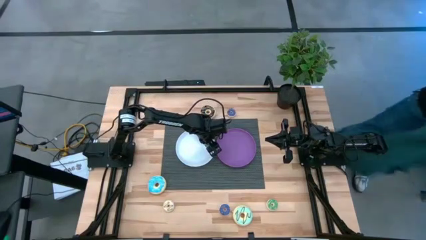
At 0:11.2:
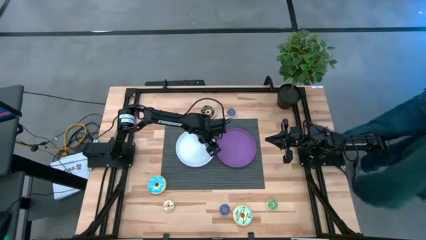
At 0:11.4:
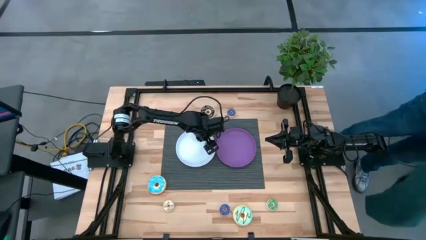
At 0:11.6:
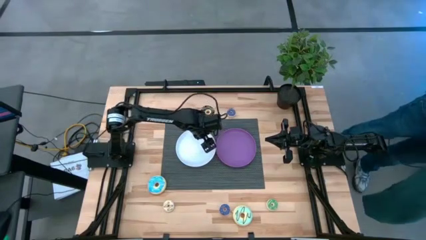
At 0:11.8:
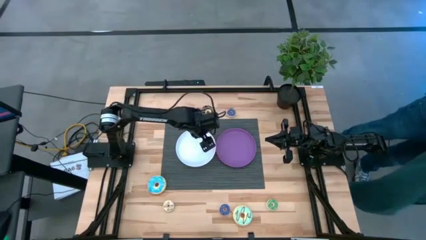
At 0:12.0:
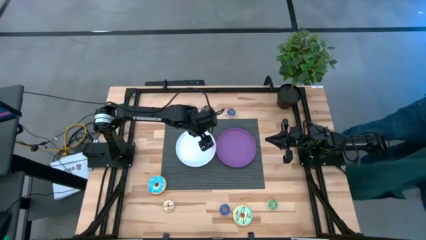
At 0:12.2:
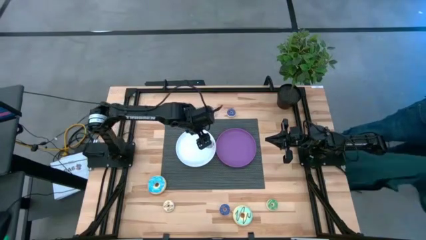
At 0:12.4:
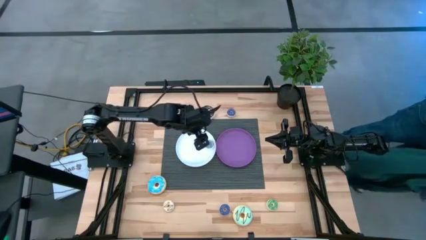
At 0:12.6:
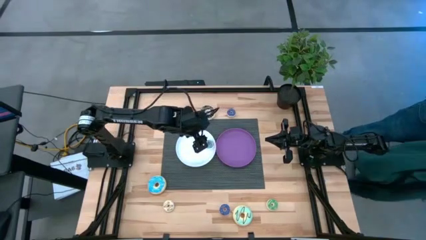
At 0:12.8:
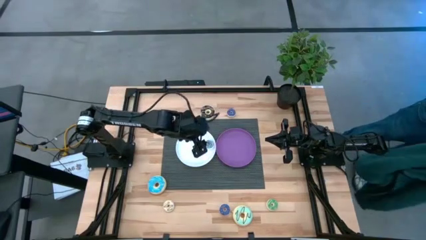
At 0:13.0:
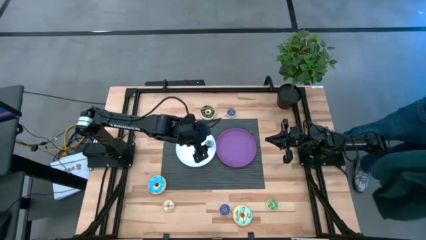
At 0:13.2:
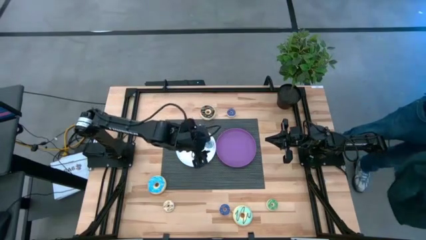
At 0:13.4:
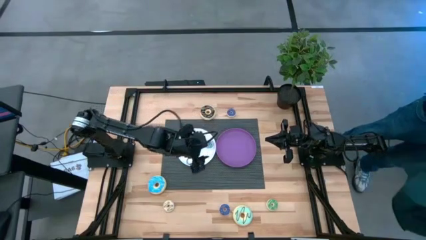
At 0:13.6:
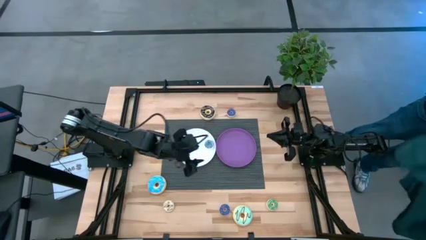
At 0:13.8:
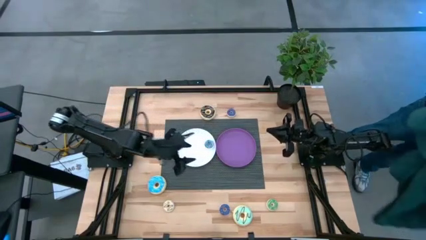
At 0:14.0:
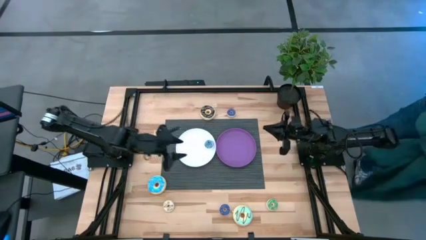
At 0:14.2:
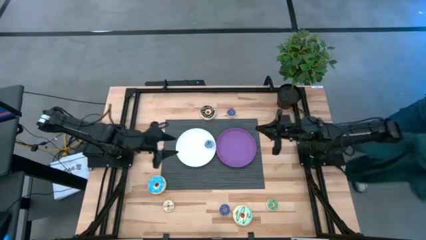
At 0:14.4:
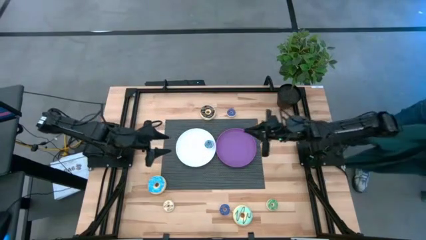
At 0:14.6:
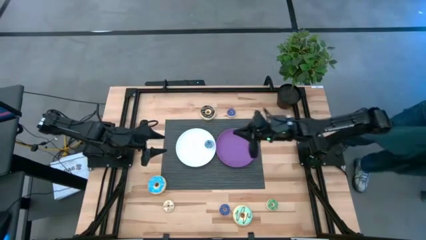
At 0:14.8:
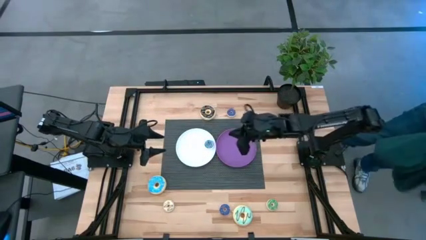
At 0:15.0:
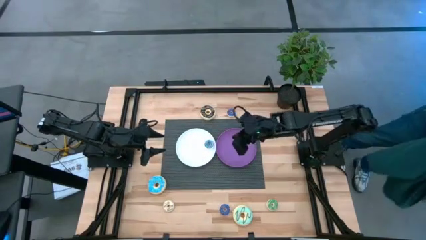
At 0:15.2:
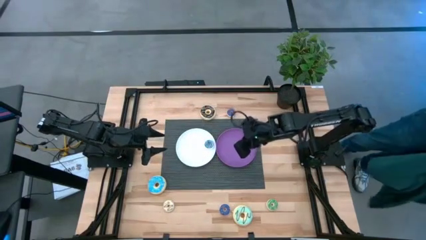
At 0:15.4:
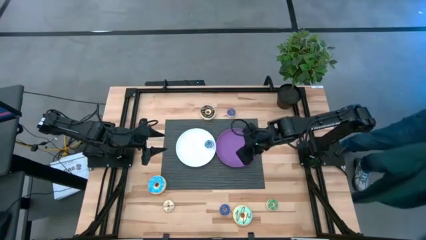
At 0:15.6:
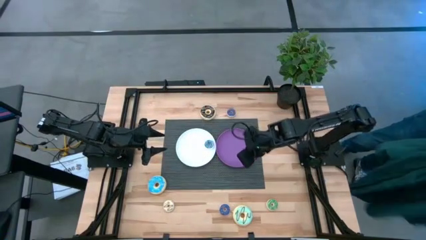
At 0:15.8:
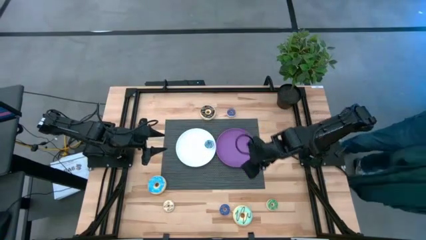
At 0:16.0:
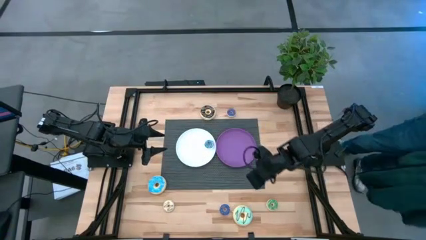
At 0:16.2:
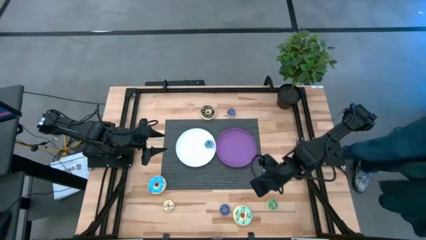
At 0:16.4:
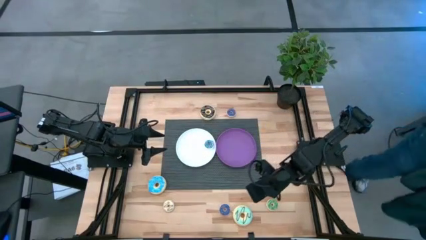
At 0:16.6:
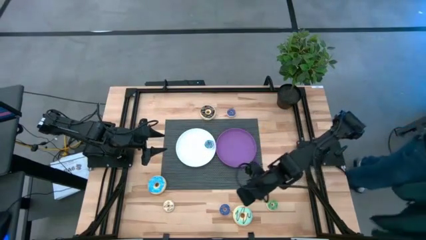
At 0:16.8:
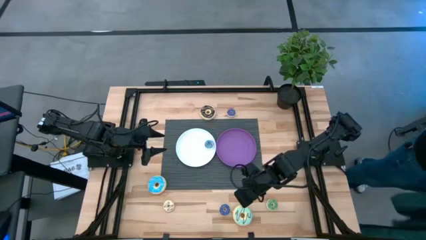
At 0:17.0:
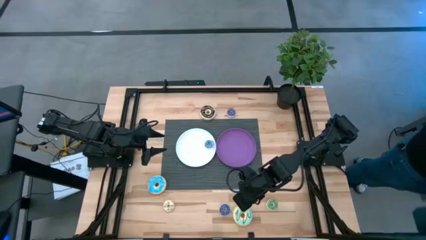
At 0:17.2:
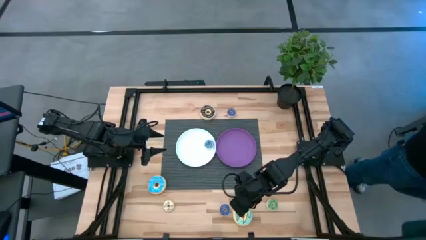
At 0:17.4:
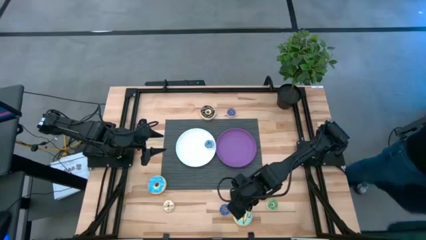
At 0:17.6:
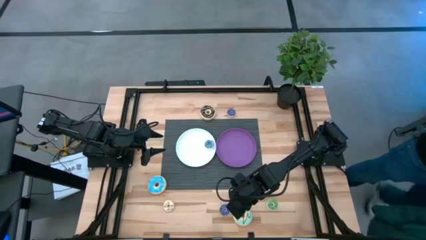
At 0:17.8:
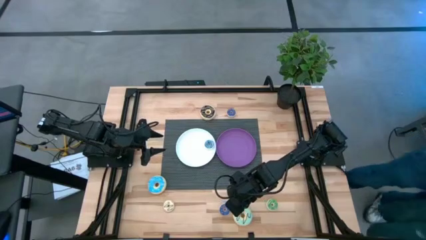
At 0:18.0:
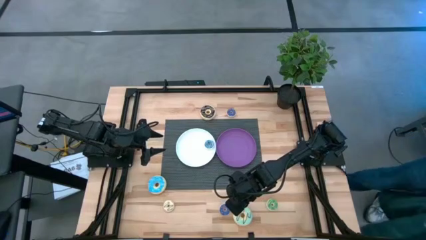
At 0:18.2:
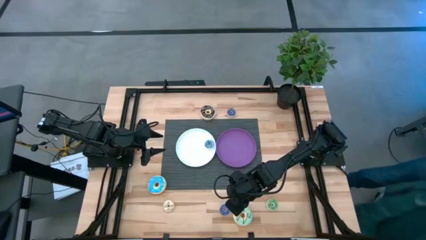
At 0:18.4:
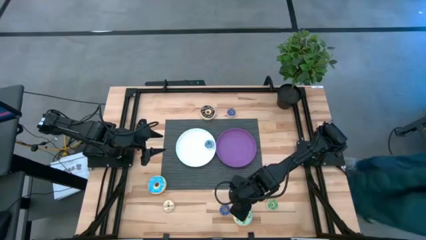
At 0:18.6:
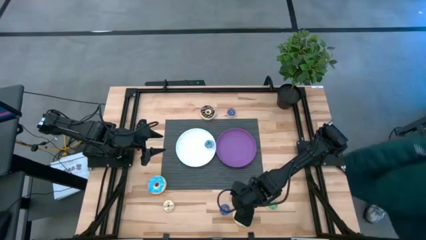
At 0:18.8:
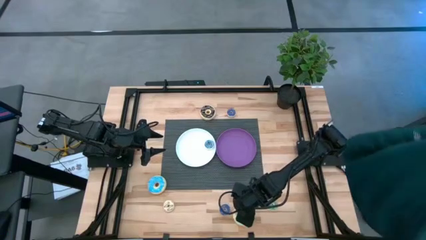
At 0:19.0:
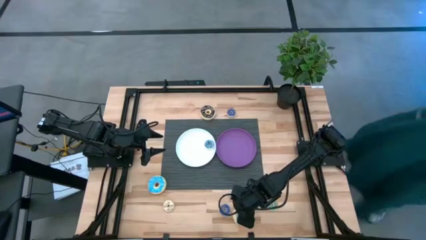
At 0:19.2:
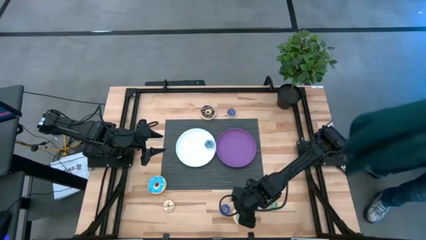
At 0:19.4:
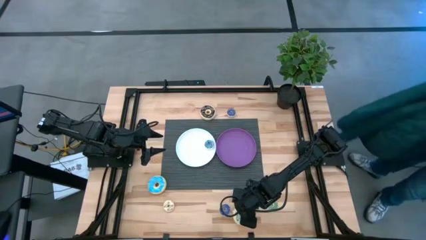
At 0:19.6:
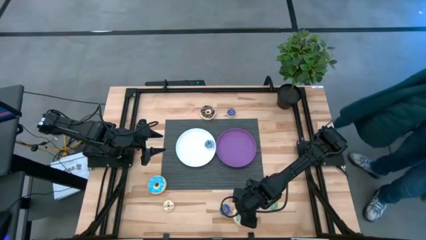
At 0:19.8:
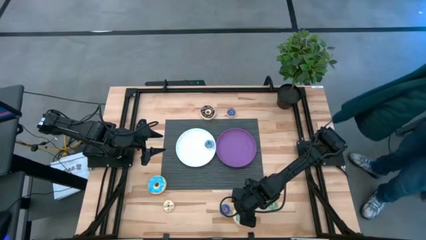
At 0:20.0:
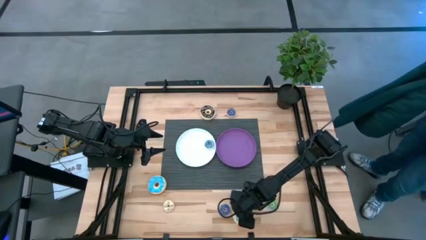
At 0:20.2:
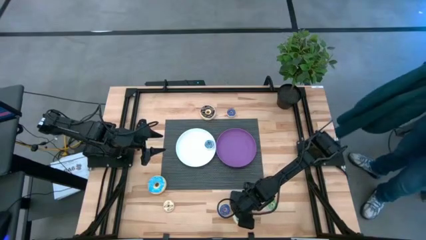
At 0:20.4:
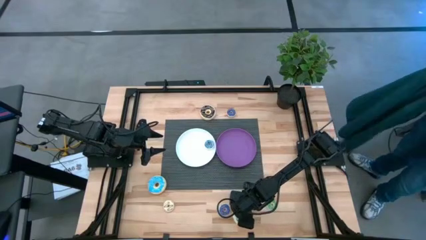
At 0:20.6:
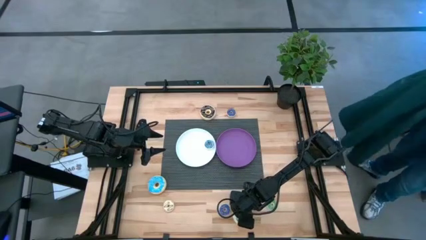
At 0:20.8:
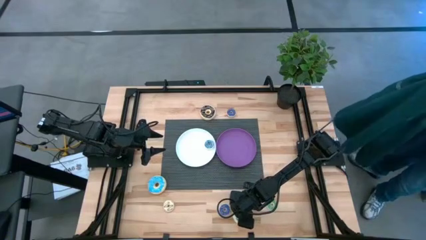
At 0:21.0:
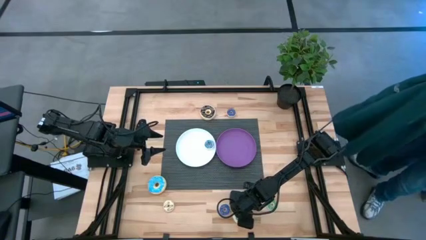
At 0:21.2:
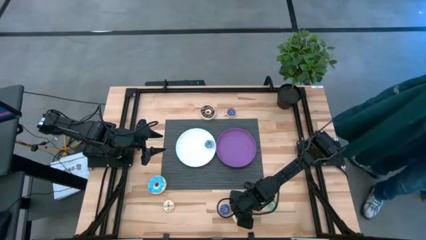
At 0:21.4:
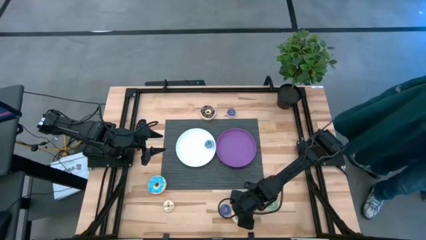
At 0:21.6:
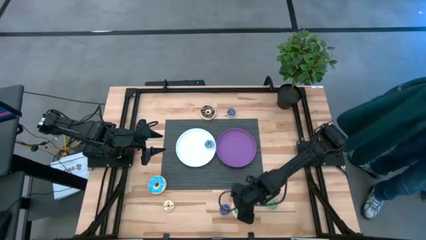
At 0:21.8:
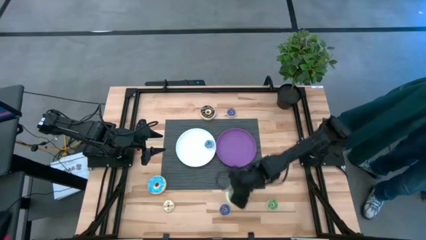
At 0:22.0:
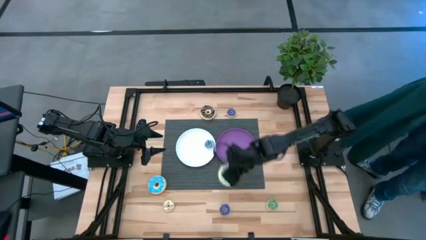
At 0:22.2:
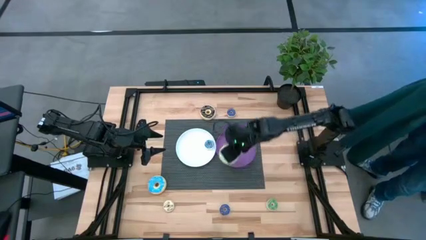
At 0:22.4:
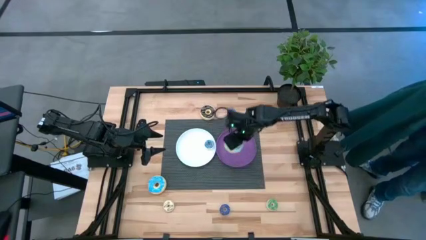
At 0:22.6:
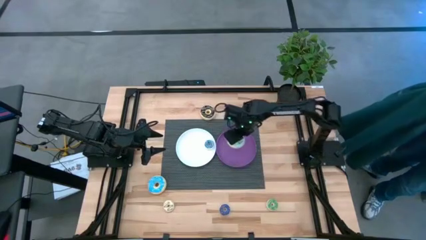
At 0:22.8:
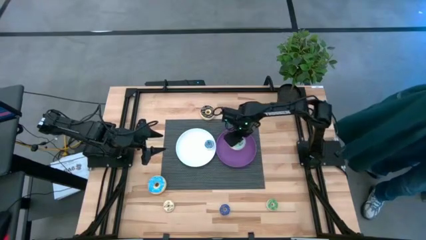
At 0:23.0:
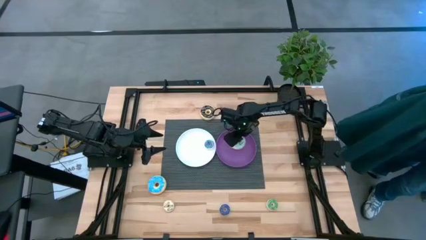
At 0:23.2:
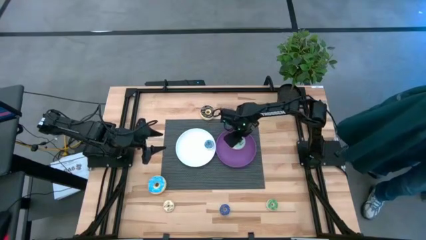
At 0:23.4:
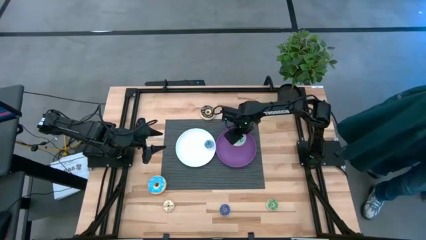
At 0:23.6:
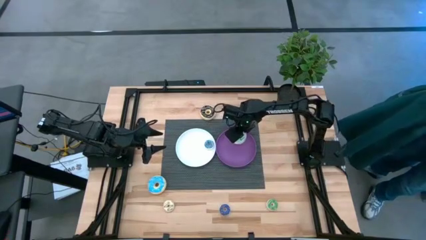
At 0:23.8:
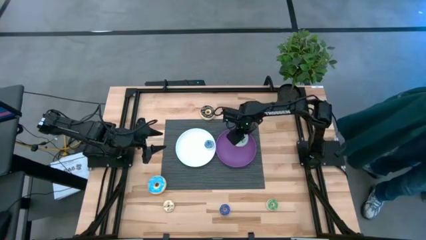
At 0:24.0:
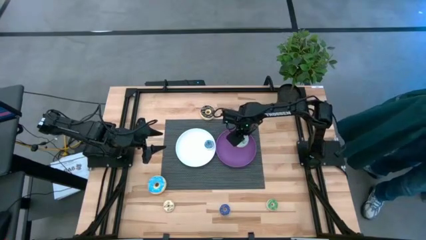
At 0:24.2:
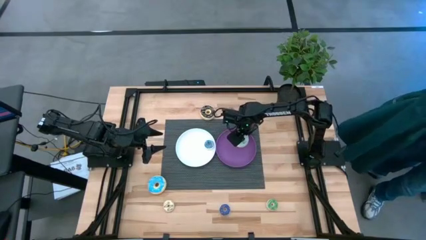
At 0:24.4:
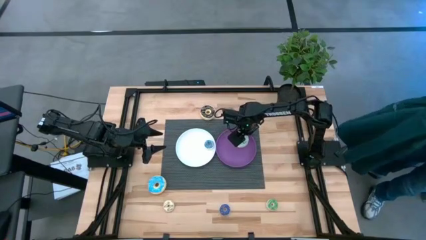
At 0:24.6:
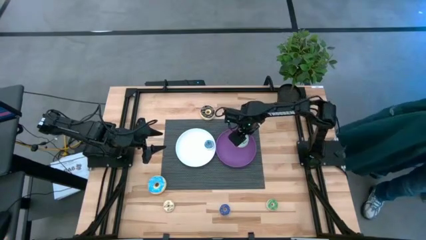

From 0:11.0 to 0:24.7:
Task: Pick & Place donuts
Put the large light blue donut on the violet plate
